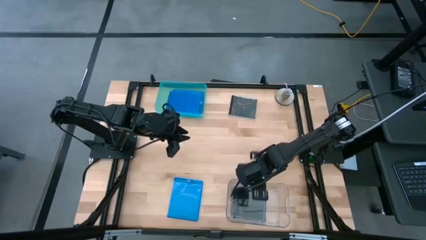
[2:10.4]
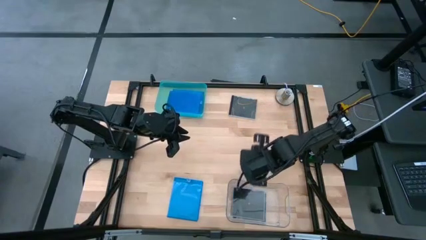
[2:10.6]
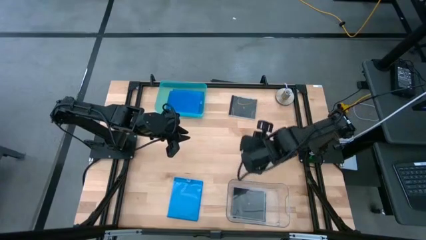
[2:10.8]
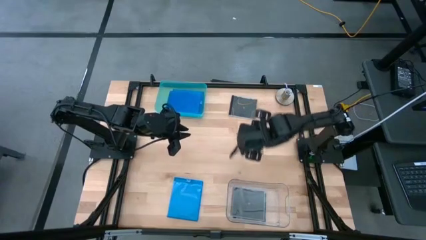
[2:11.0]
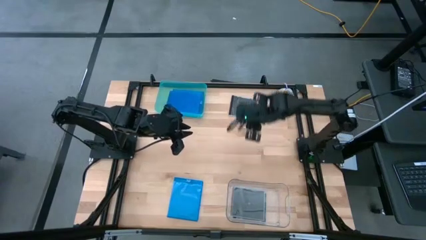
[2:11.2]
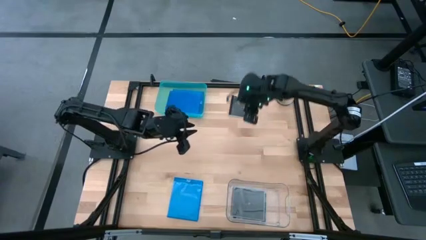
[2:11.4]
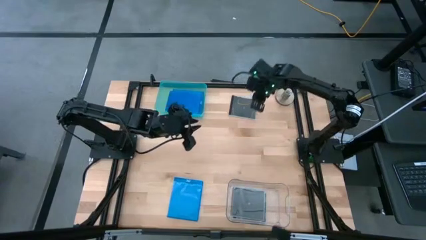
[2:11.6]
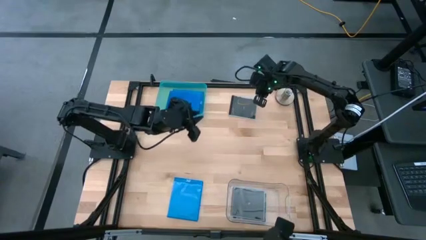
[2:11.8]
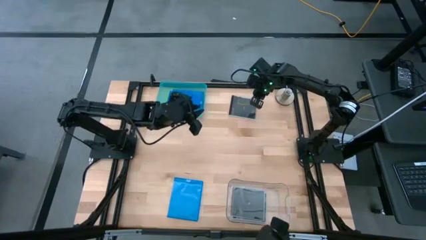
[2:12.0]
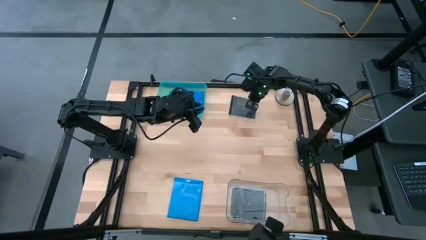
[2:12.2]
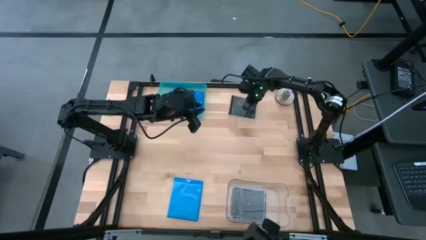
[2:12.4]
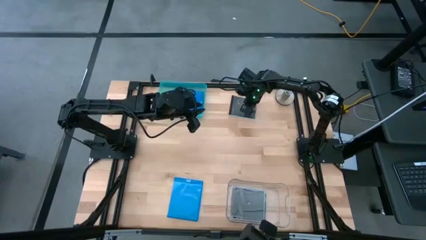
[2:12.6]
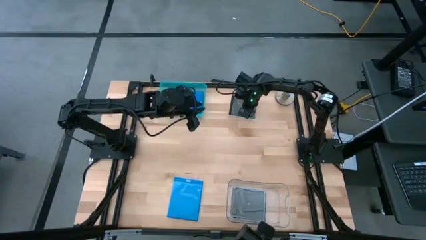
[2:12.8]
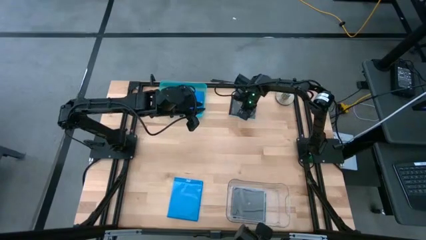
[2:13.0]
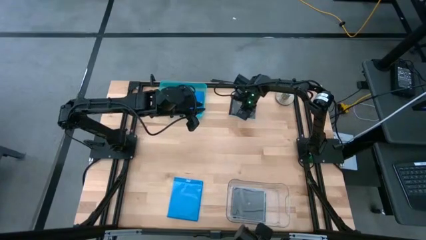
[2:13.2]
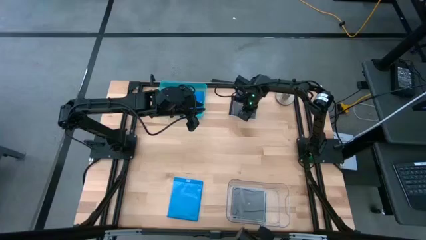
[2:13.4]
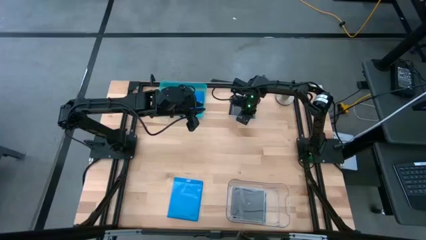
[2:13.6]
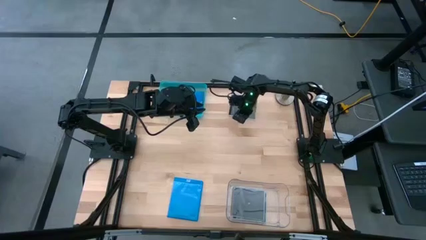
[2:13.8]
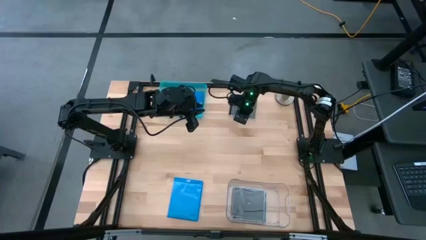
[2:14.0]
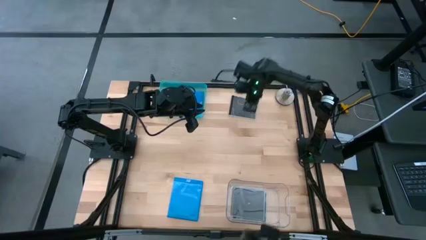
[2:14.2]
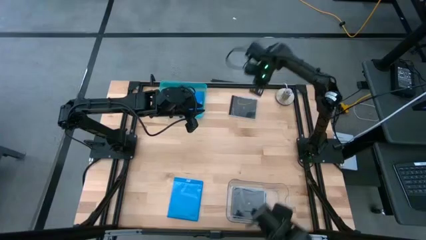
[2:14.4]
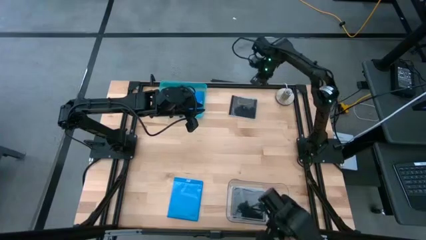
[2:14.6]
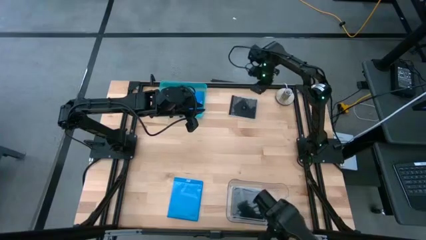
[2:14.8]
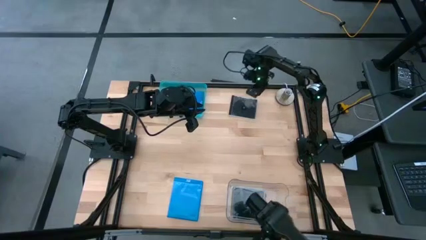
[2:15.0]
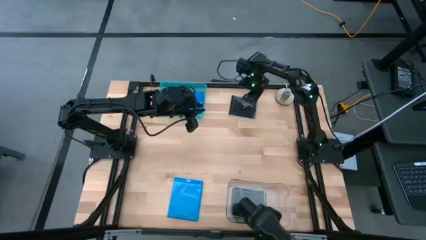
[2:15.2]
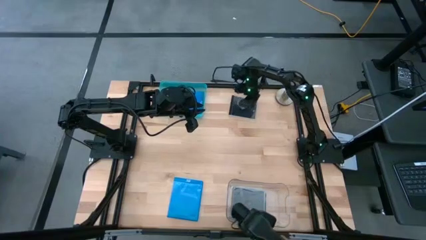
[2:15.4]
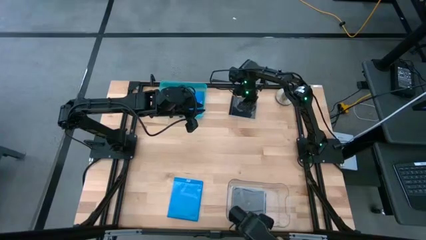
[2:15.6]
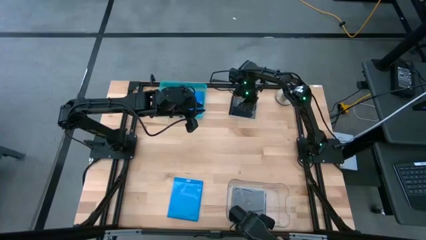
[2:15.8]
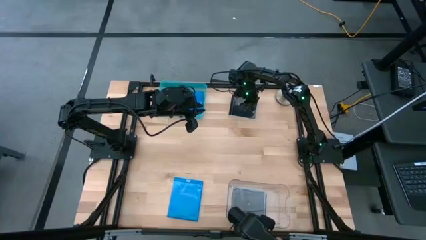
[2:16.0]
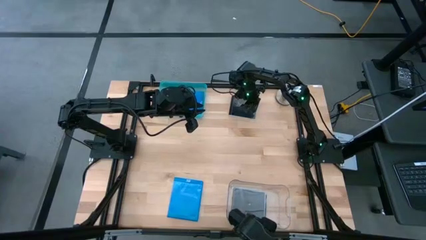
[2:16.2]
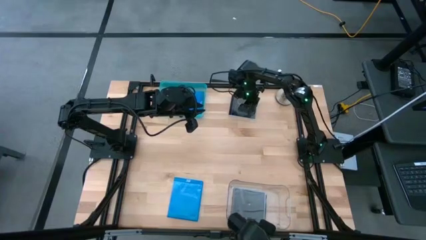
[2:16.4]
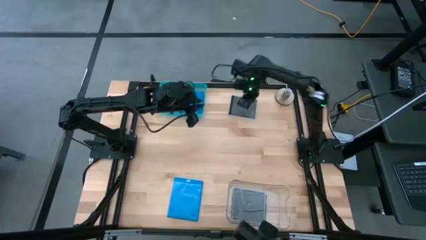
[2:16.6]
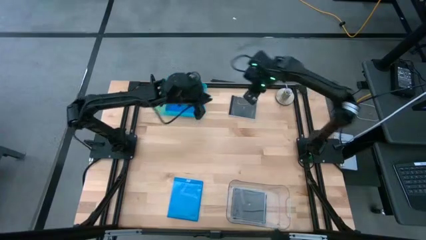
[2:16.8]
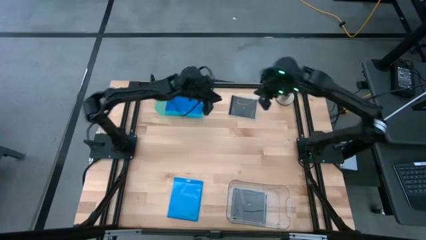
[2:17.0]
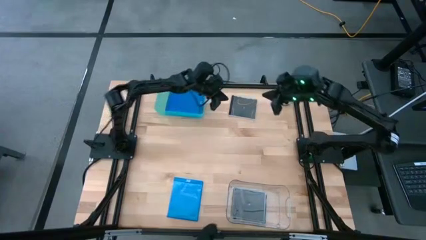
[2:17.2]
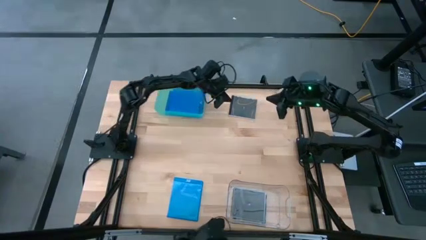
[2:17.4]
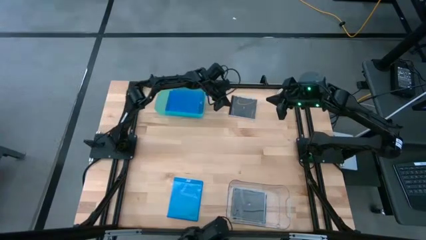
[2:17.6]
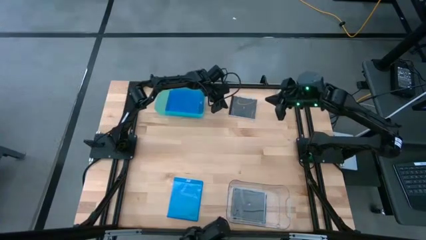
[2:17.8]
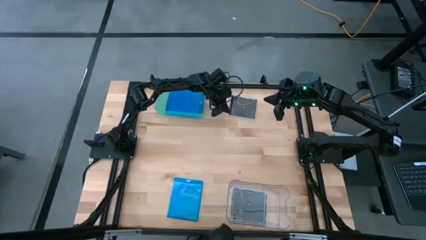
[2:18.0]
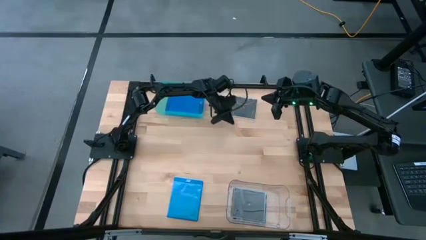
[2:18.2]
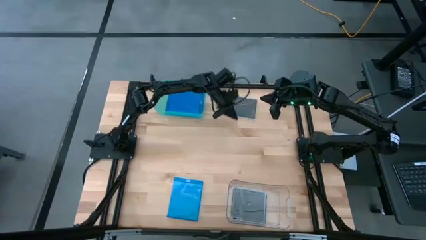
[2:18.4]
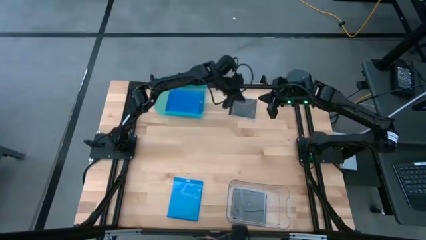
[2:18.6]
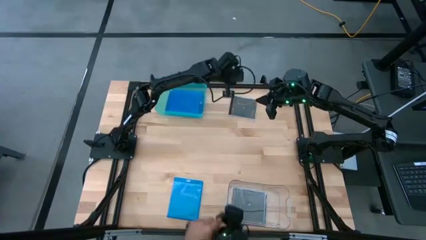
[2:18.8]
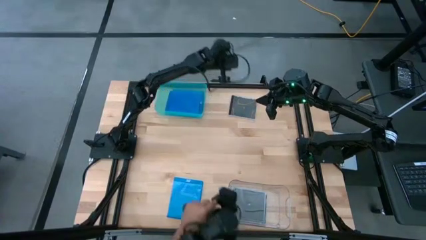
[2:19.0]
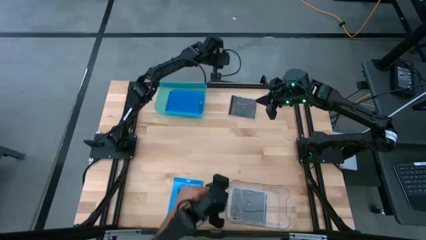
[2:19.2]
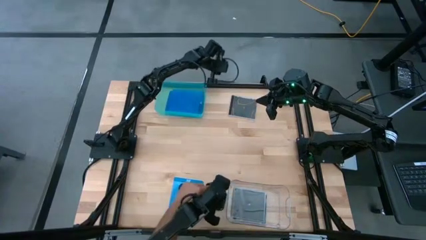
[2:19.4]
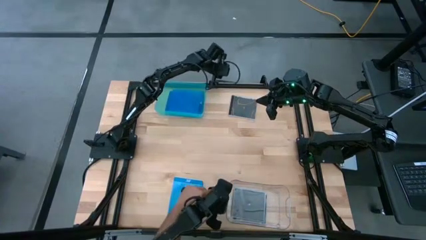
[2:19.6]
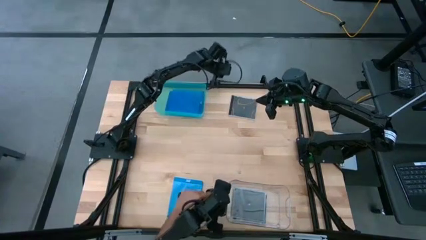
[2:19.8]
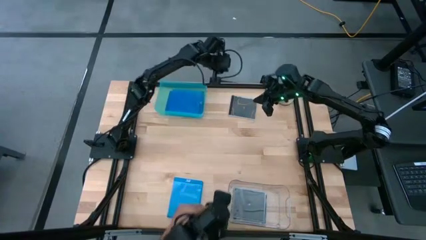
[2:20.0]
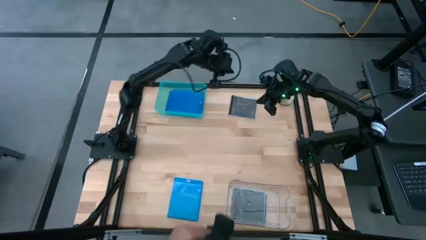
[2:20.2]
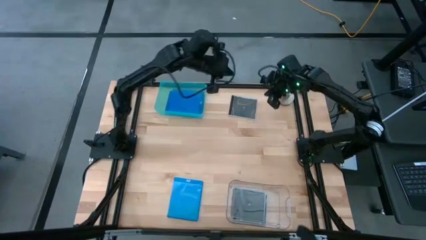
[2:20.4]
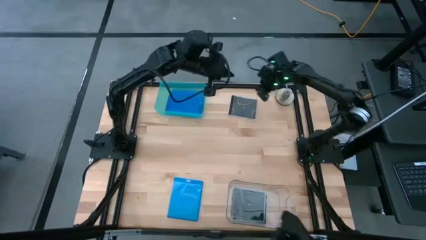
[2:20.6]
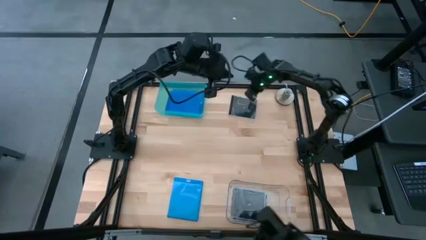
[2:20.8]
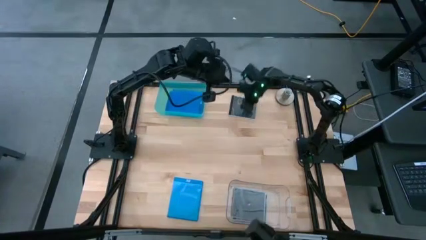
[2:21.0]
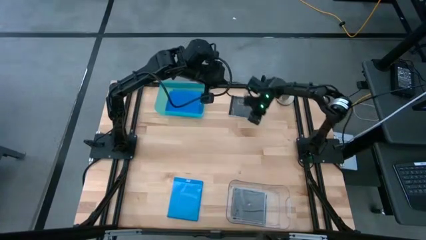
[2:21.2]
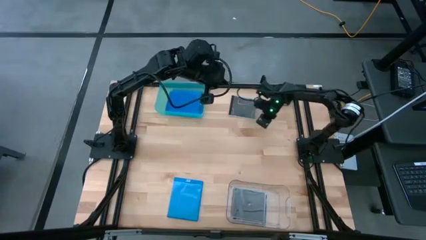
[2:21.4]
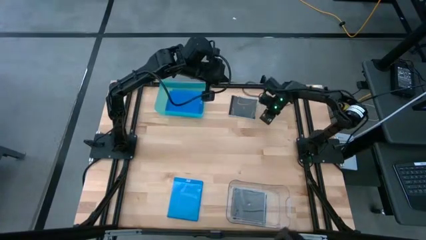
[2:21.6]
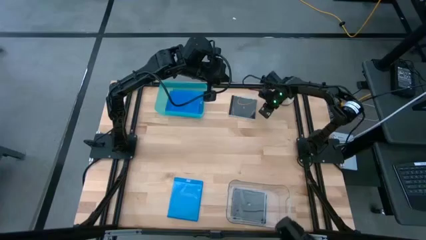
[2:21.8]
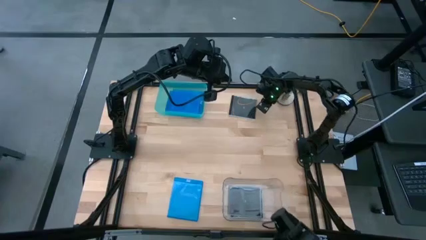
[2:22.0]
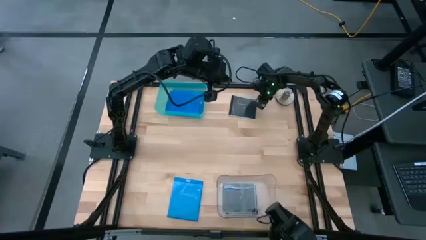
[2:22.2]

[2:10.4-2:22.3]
Task: Pick & place jewel cases by type
Put the black CD case into the transparent bin

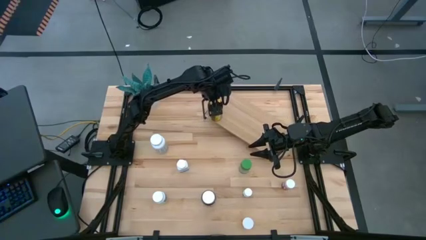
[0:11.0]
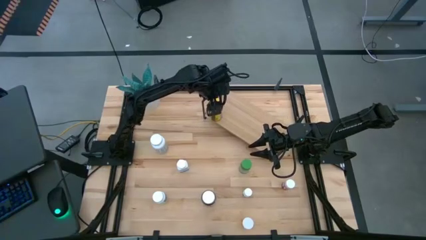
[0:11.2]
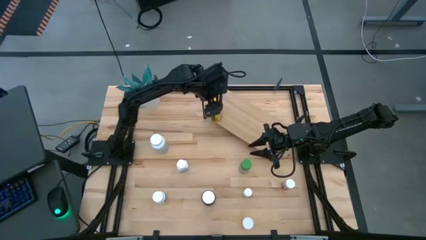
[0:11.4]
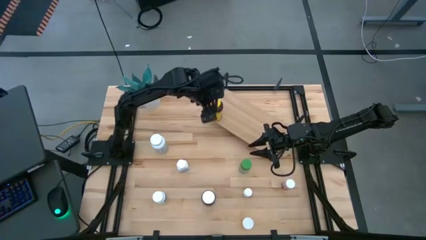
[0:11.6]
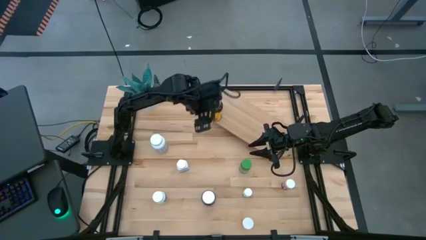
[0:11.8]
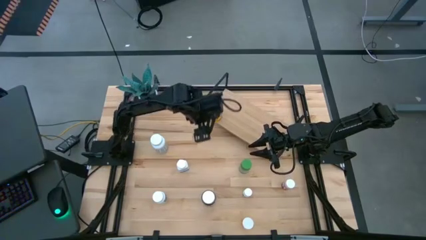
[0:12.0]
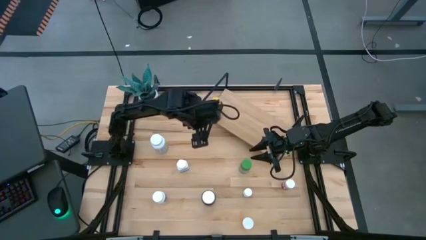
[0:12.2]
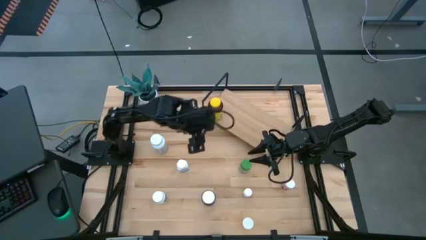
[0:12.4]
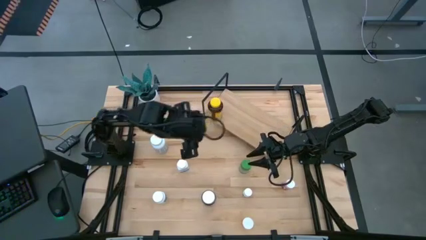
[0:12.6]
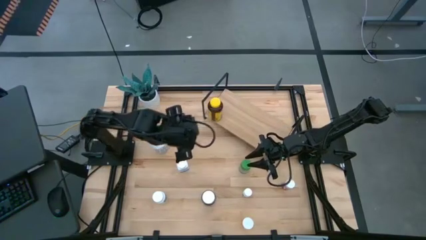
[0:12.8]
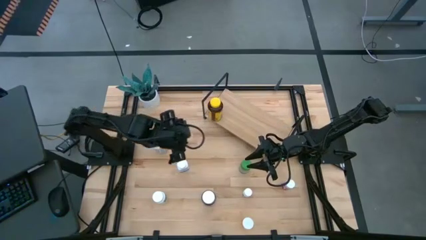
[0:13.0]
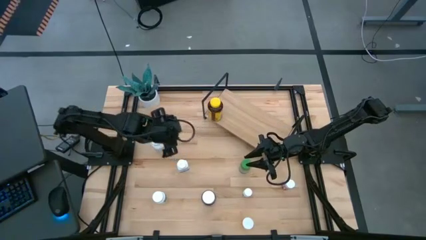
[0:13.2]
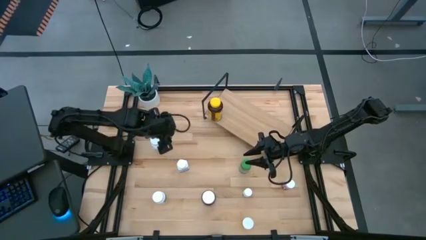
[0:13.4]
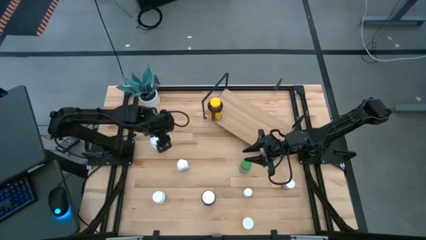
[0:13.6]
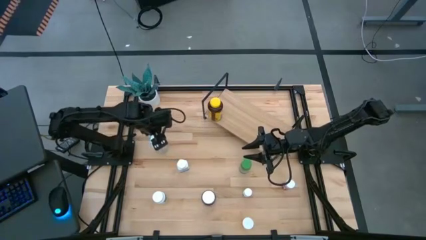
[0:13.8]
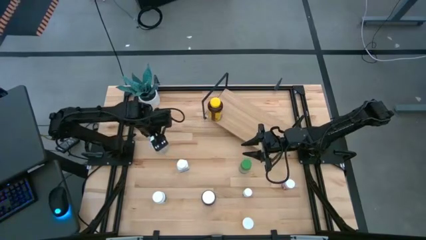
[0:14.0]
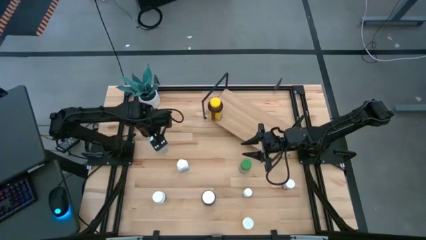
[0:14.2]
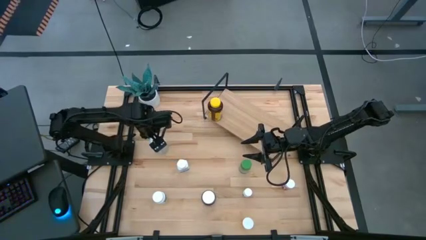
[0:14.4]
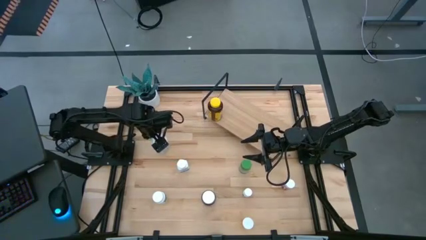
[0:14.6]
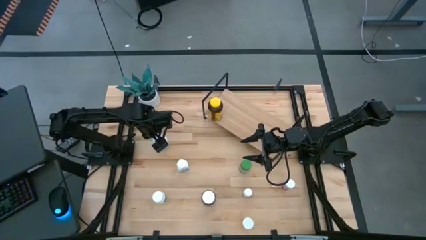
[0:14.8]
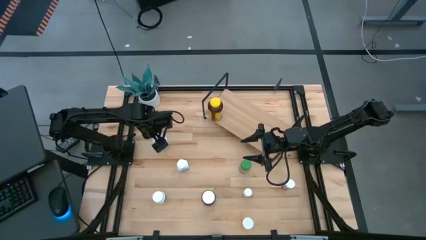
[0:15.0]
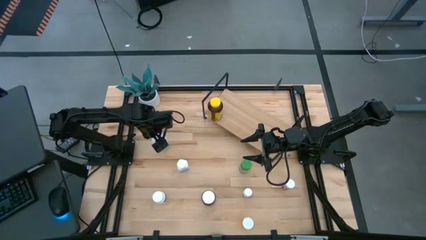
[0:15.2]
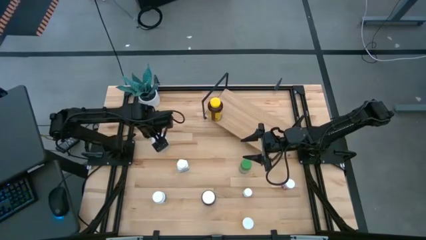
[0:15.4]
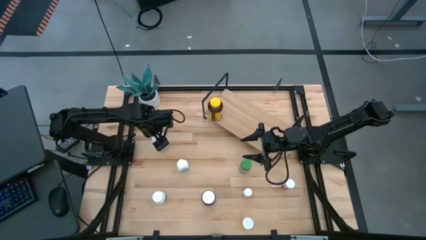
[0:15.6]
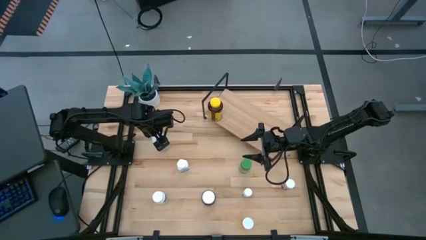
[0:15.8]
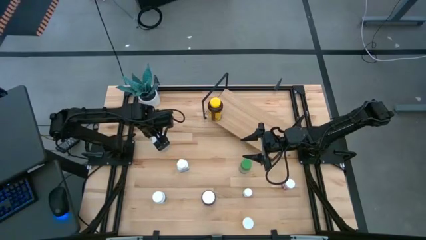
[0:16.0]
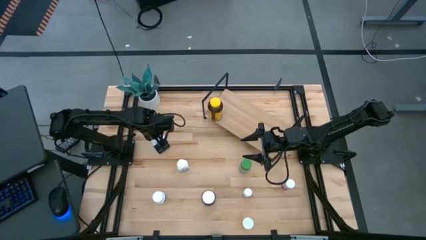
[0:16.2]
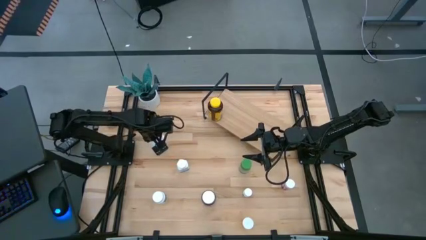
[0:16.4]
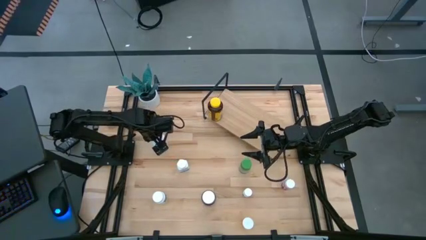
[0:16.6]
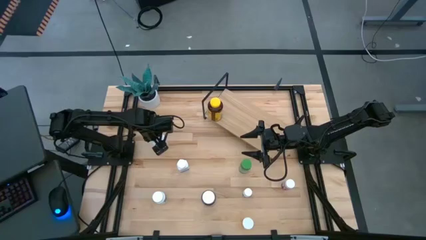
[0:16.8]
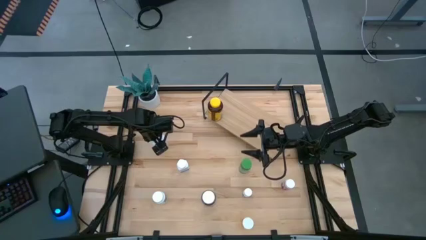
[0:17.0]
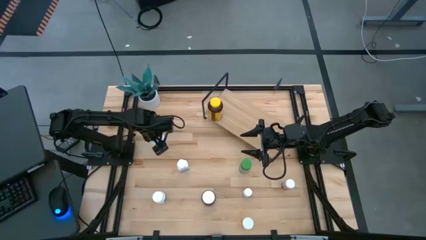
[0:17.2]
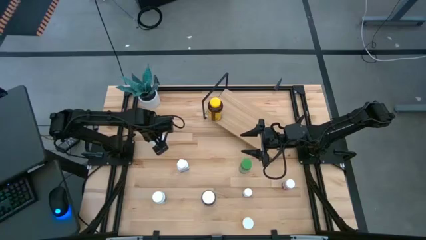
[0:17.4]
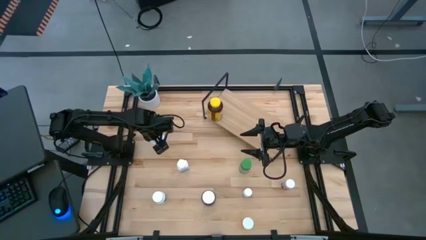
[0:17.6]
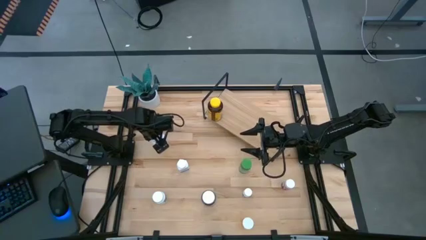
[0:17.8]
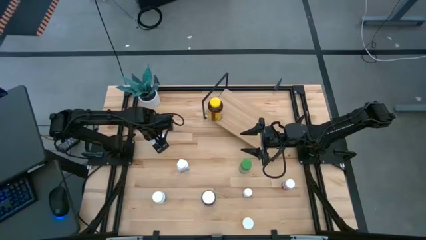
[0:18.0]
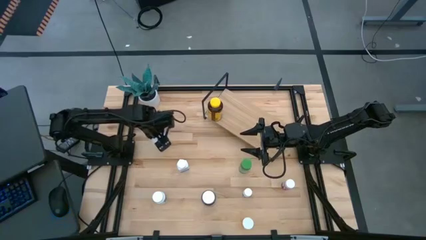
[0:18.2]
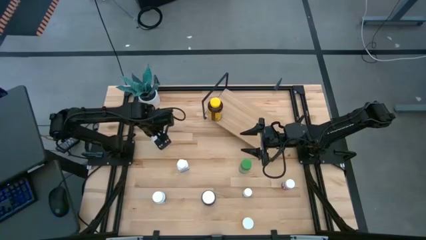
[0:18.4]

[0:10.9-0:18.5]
Task: Pick and place medicine bottles onto shelf by color
Put the white and red pill bottle on the shelf
